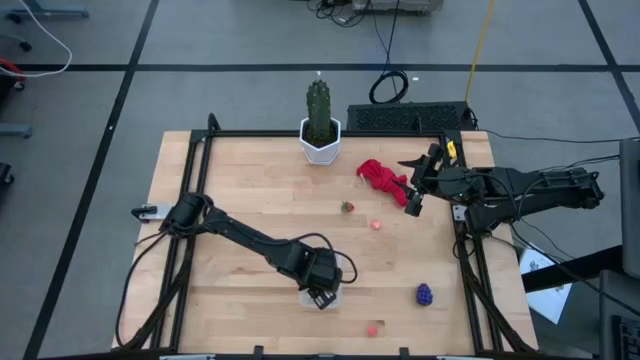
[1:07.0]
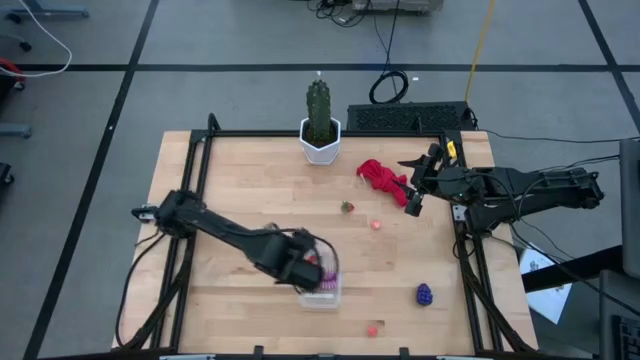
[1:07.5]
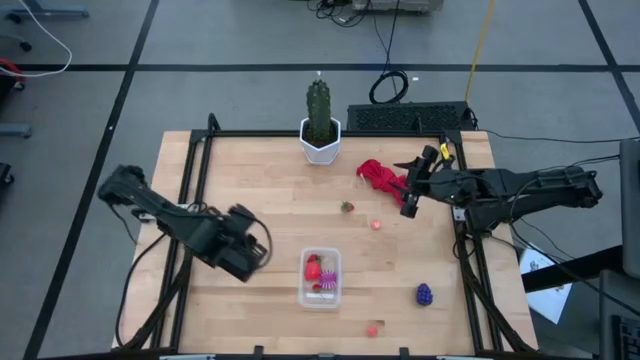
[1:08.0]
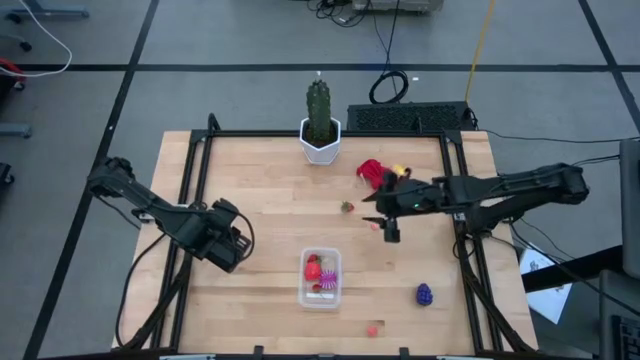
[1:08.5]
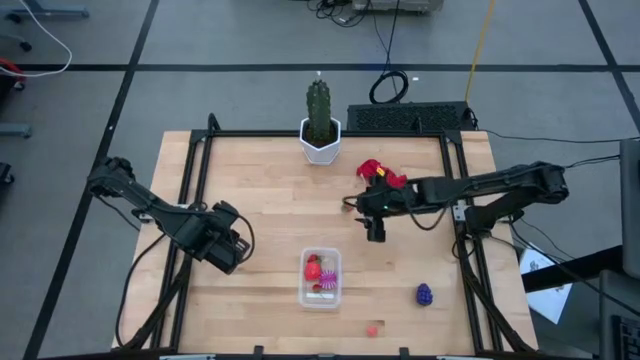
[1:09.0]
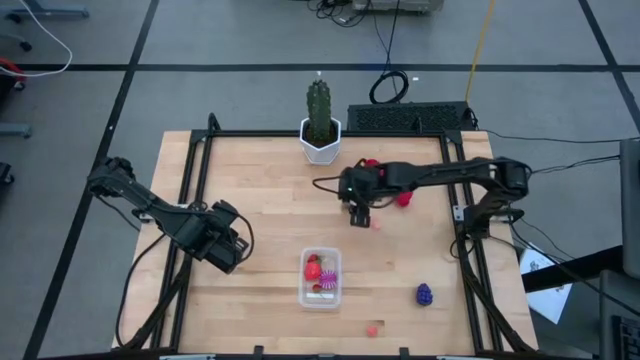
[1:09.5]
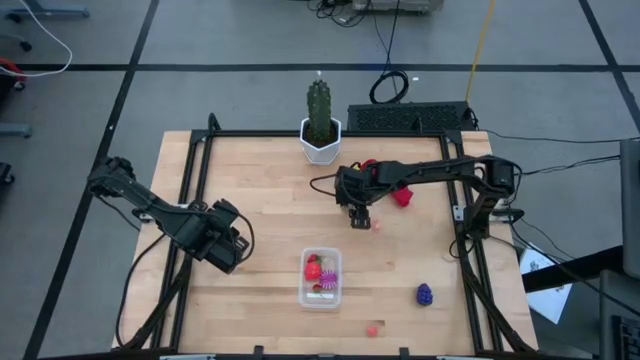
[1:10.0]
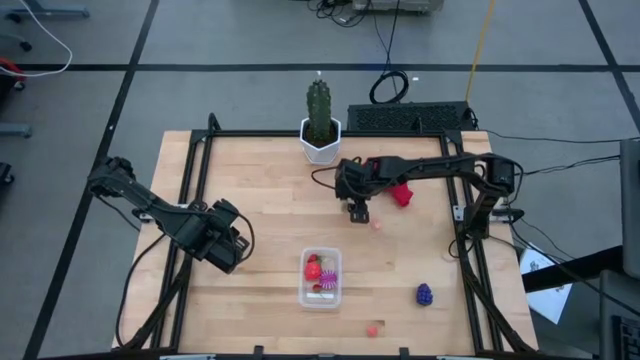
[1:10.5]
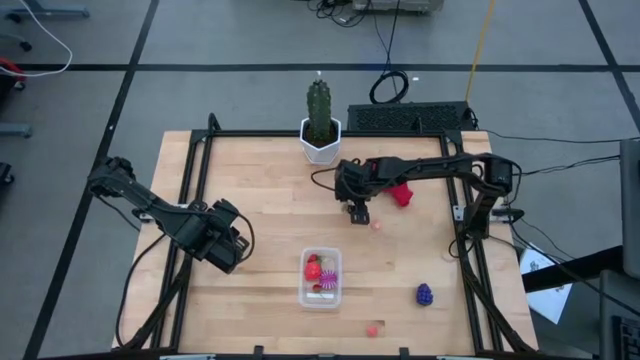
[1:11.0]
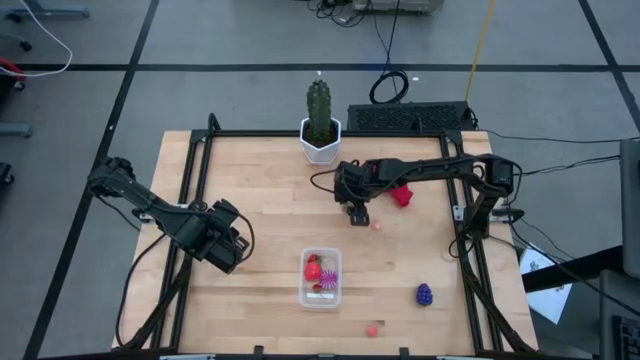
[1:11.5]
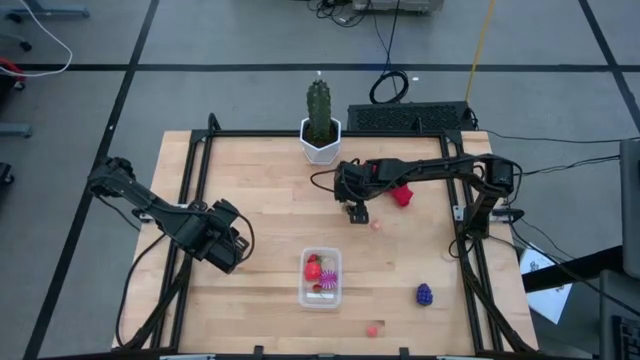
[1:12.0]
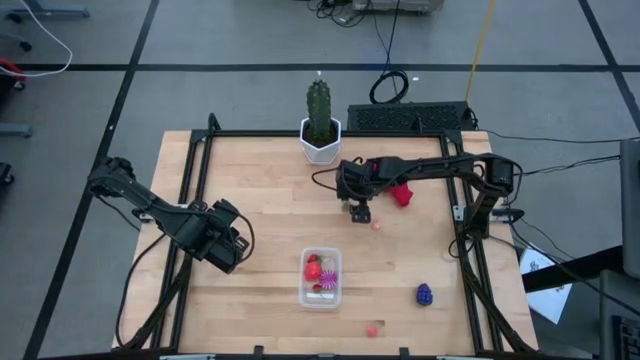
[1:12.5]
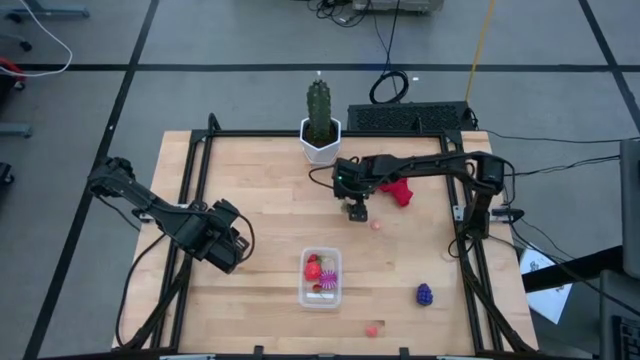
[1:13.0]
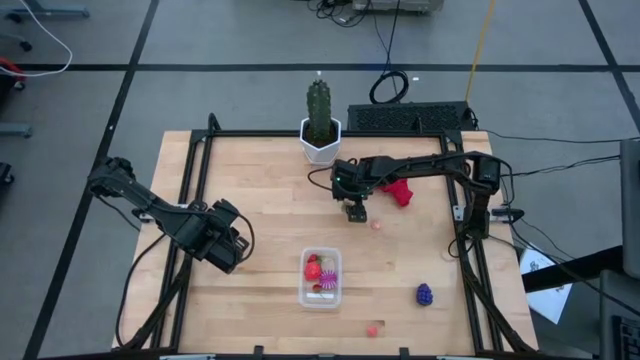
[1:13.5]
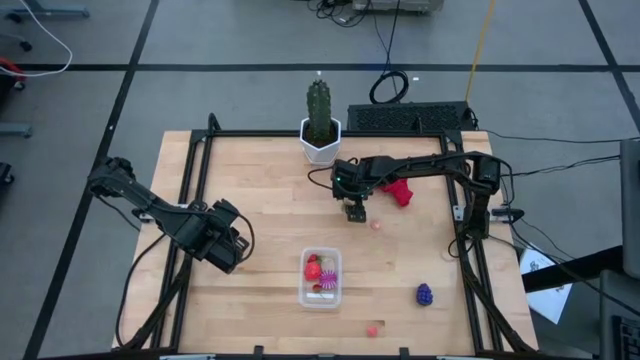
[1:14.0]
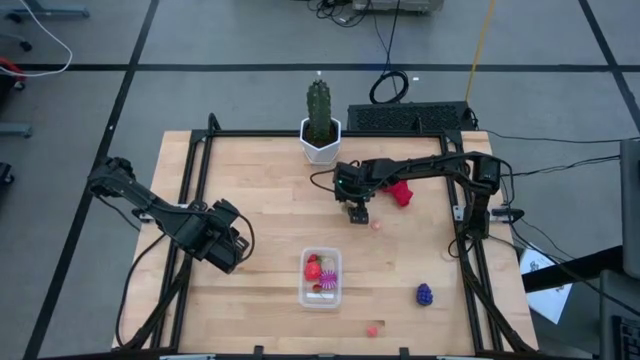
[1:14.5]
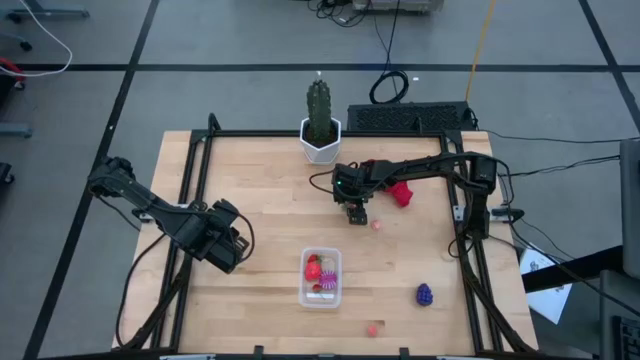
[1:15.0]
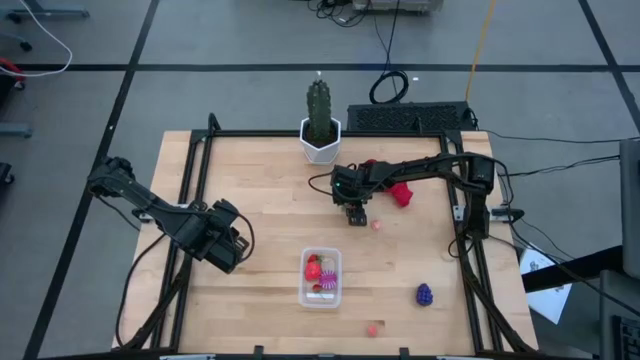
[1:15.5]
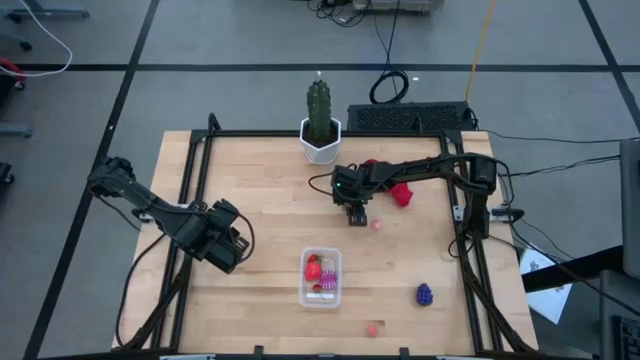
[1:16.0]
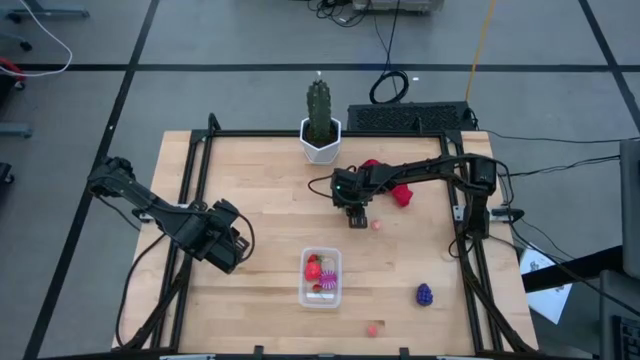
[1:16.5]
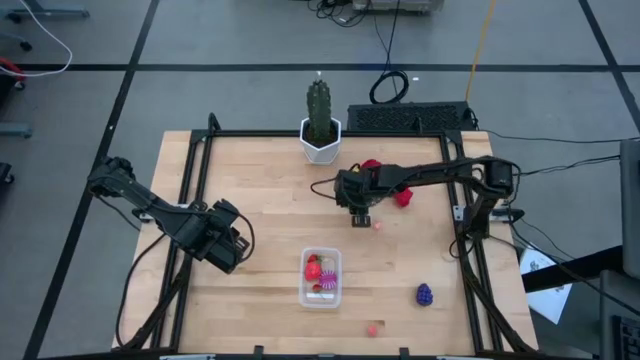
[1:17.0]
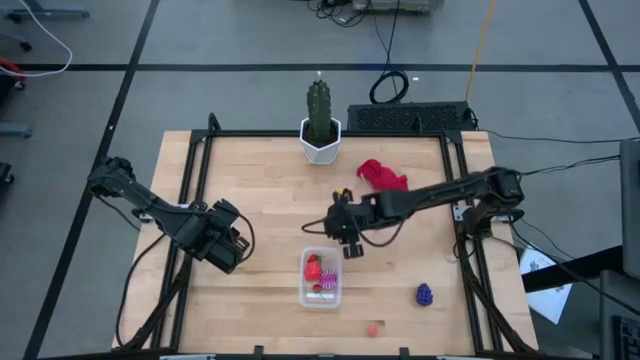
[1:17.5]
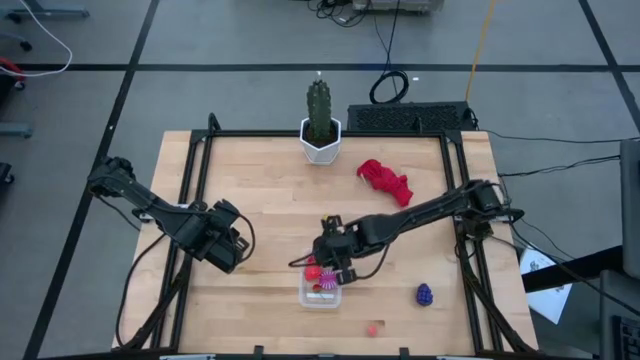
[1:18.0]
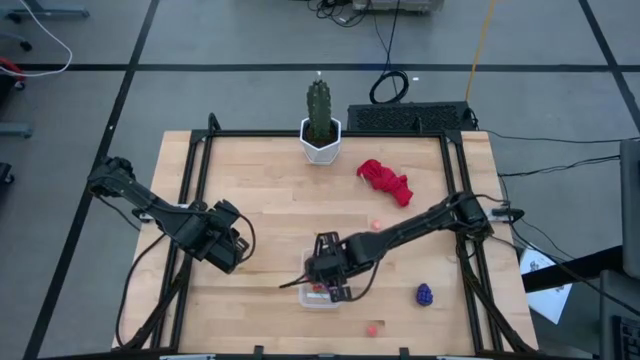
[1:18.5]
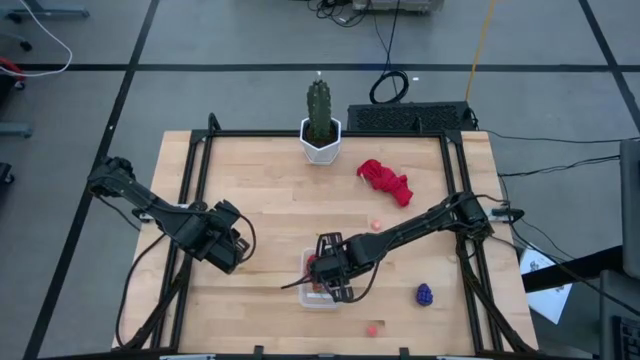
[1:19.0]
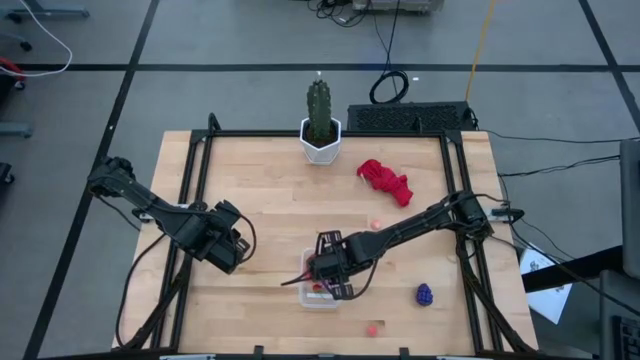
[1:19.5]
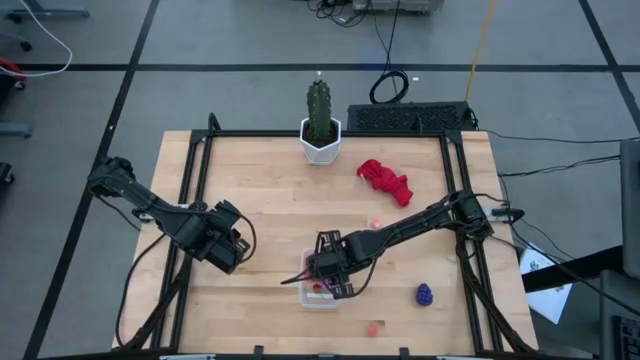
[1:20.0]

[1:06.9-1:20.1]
Task: Pick and placing Produce into tupperware
Put the strawberry into the transparent container

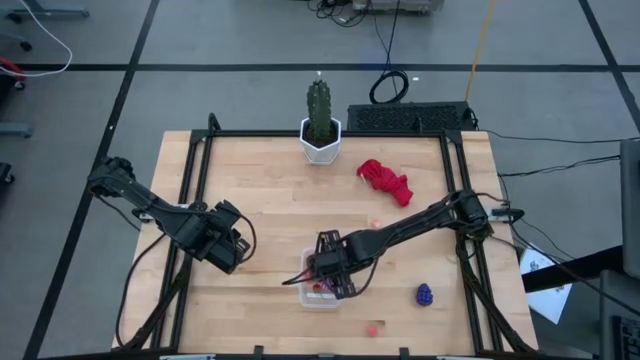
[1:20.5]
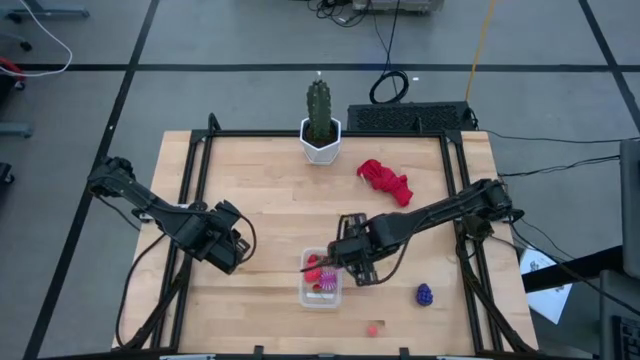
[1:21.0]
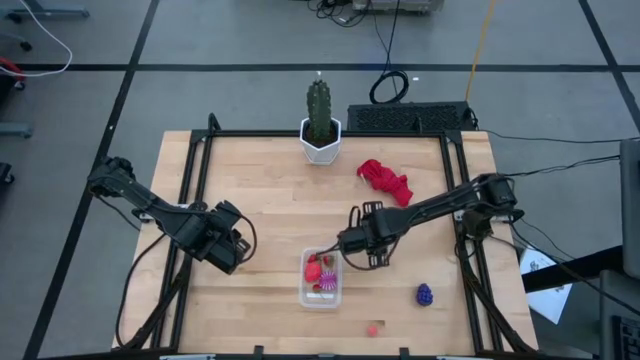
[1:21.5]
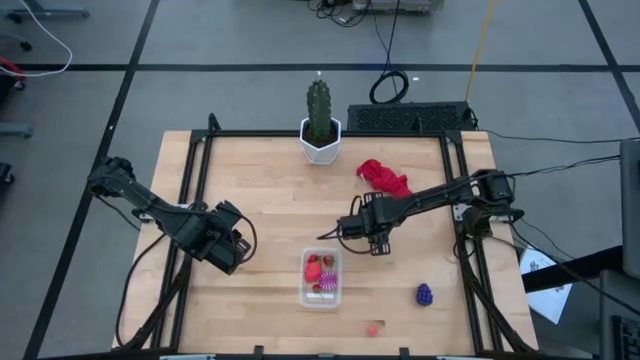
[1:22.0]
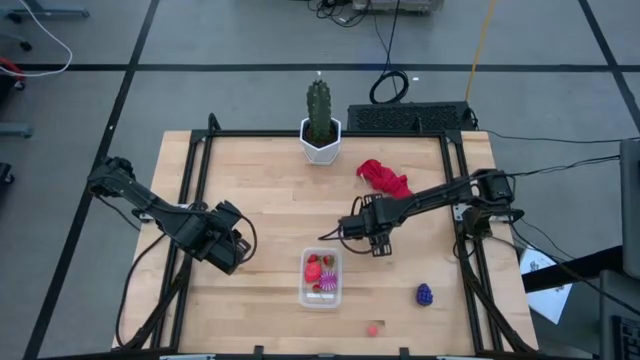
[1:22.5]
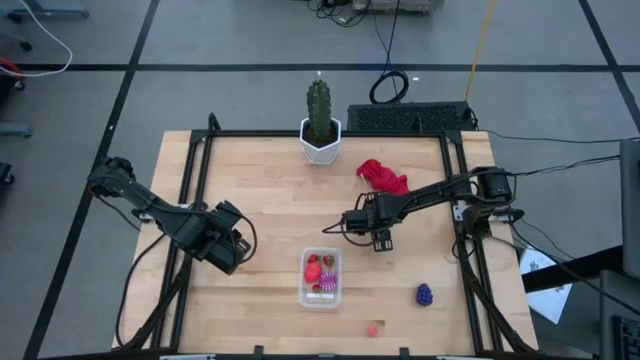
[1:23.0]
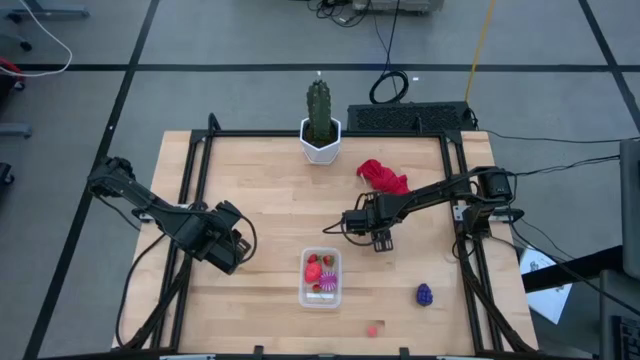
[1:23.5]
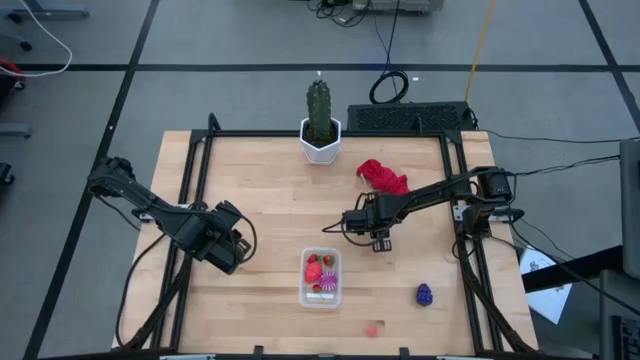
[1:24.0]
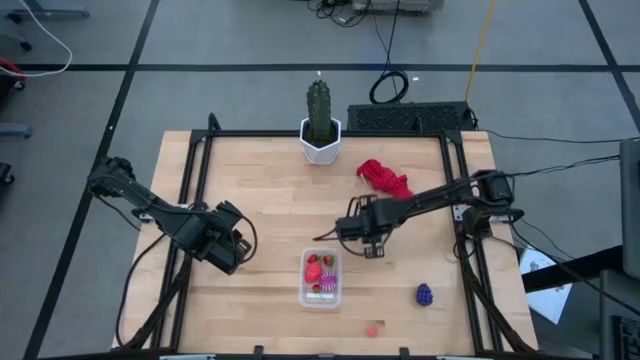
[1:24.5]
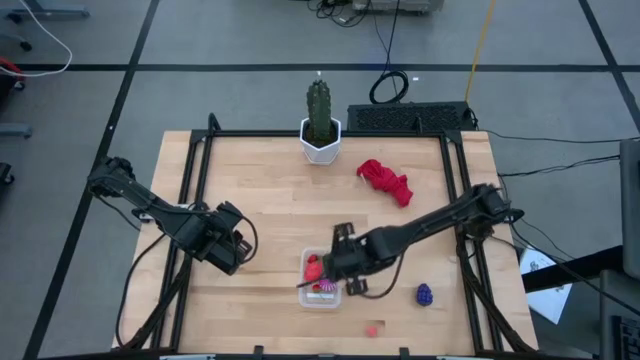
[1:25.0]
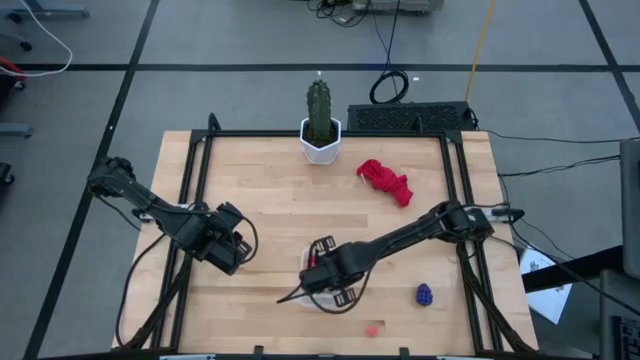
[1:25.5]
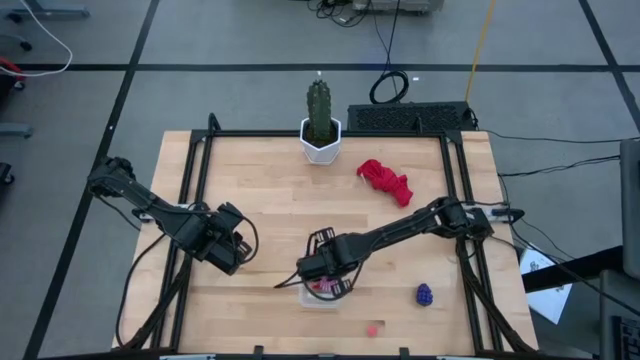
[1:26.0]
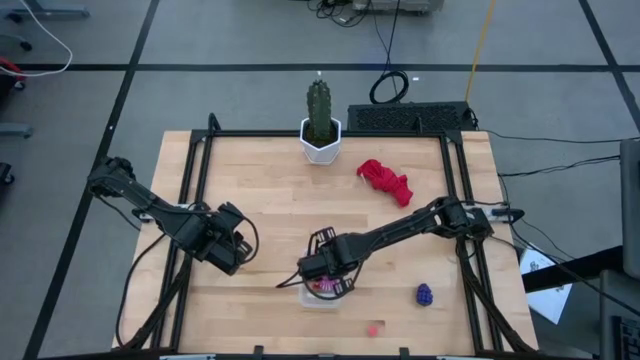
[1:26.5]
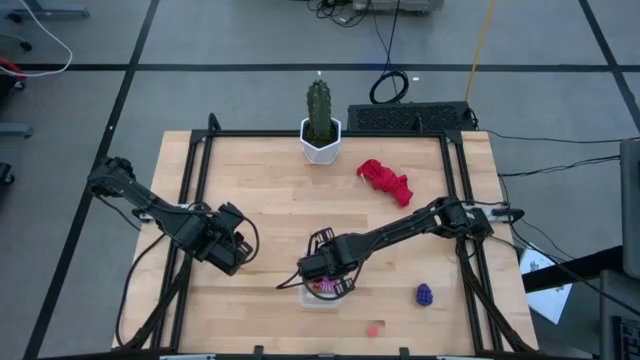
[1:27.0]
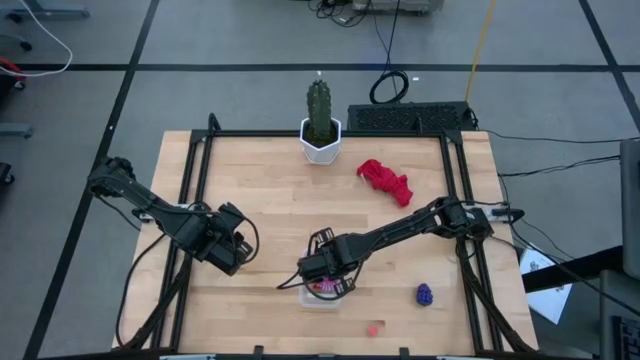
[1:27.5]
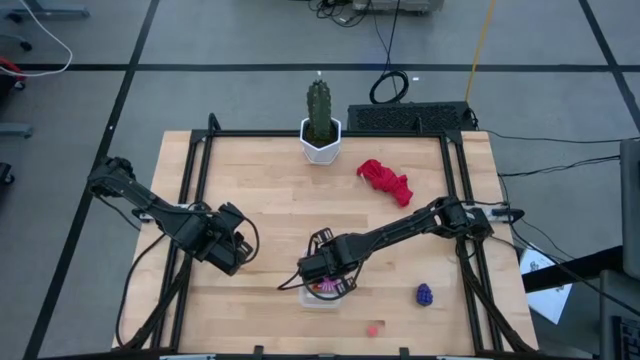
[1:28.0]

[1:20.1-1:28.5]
Put the top peach into the transparent container
